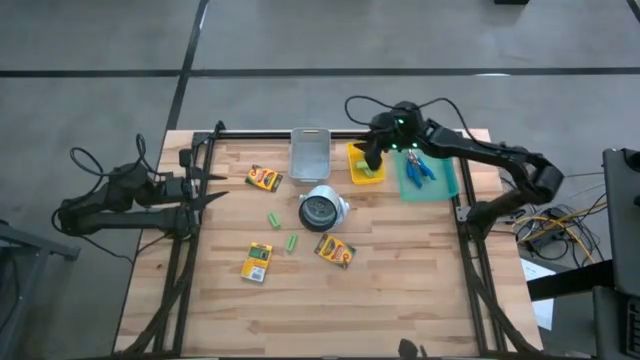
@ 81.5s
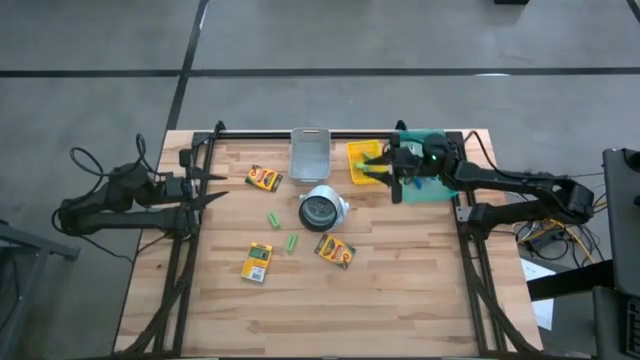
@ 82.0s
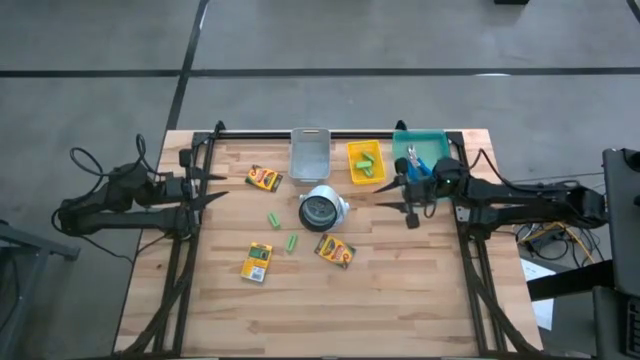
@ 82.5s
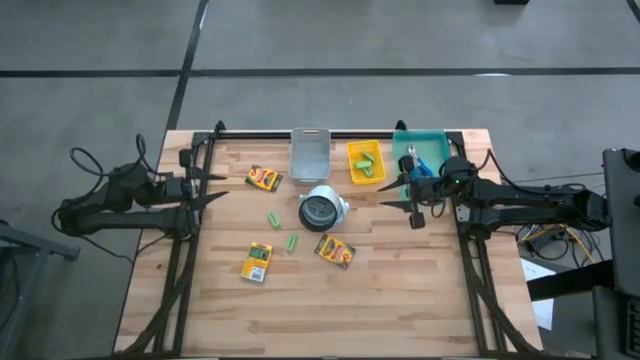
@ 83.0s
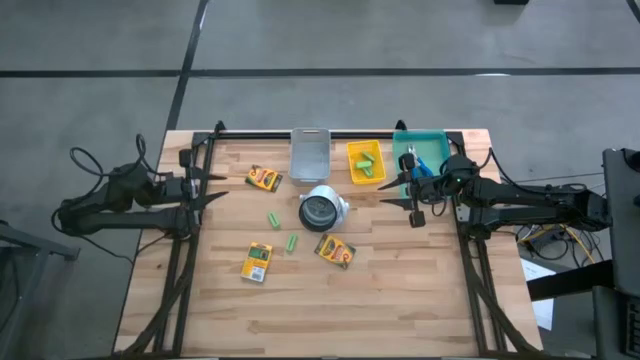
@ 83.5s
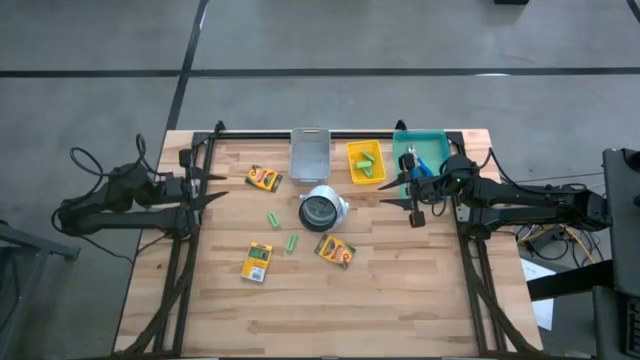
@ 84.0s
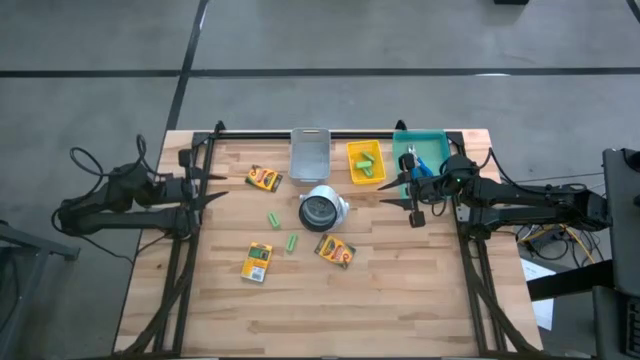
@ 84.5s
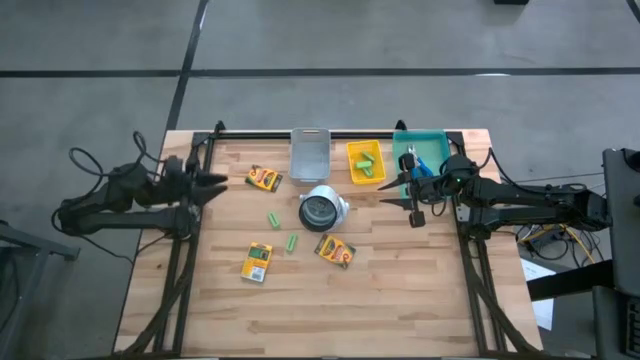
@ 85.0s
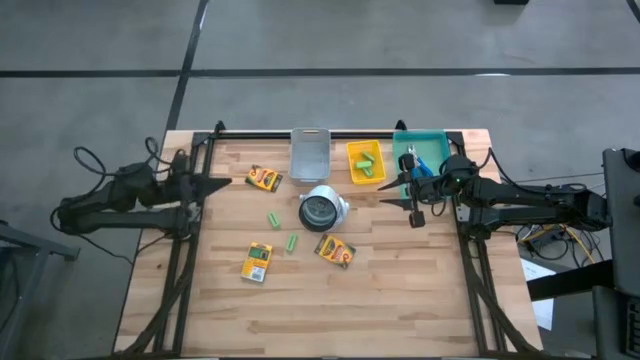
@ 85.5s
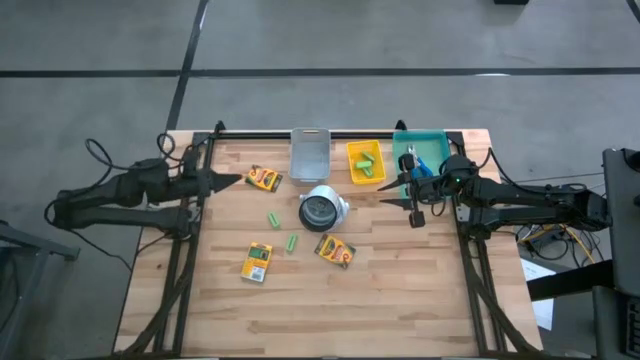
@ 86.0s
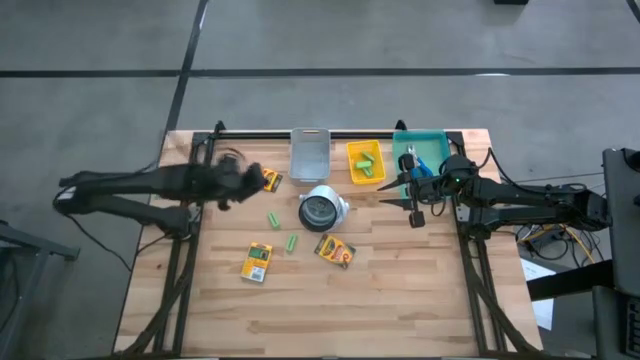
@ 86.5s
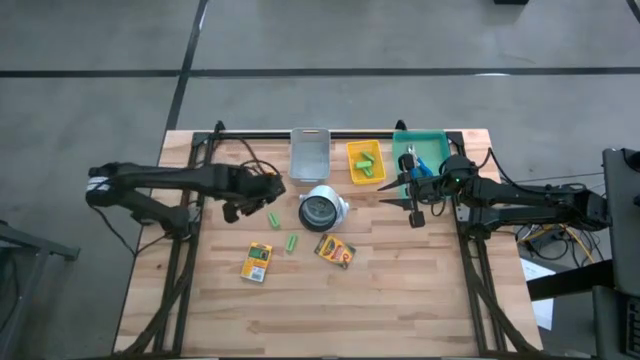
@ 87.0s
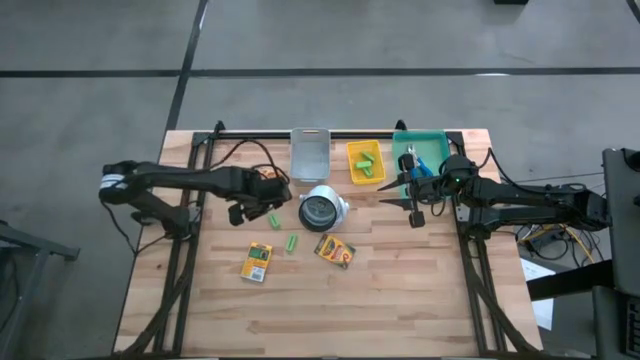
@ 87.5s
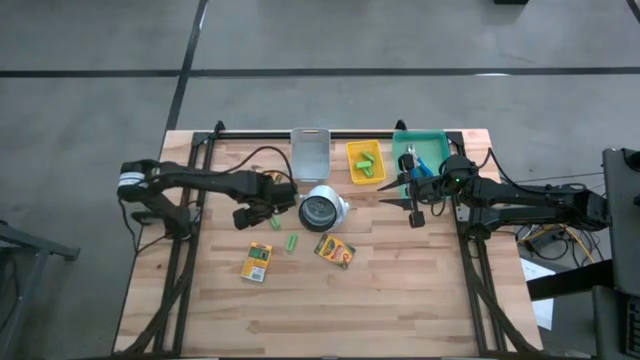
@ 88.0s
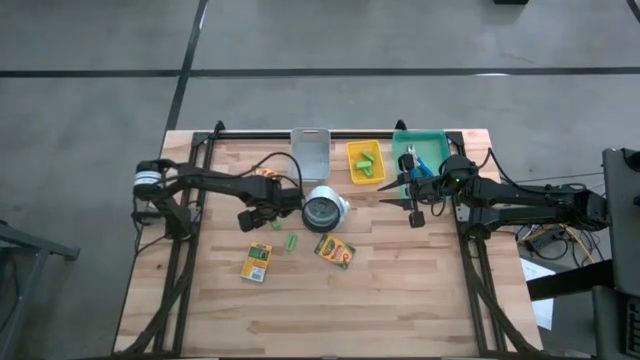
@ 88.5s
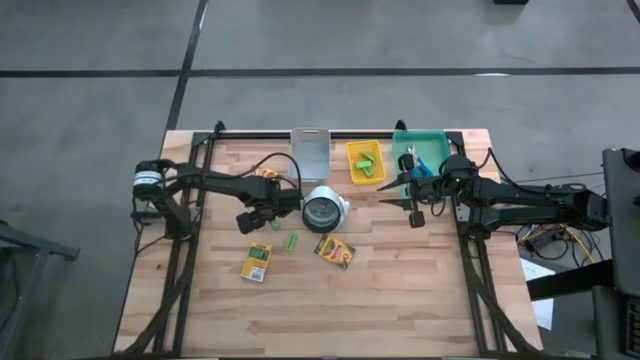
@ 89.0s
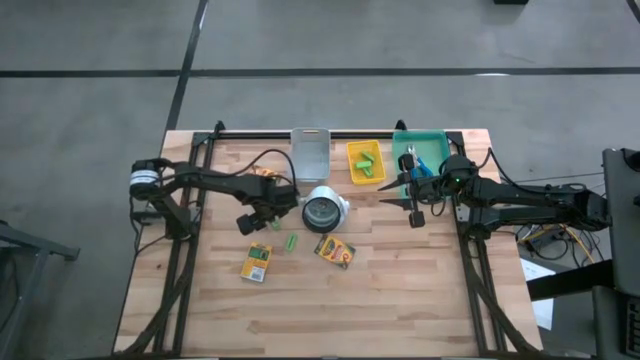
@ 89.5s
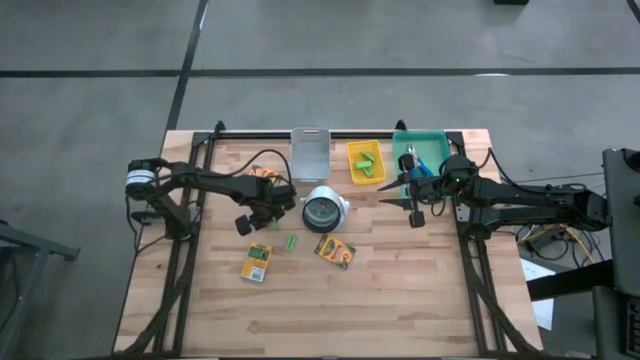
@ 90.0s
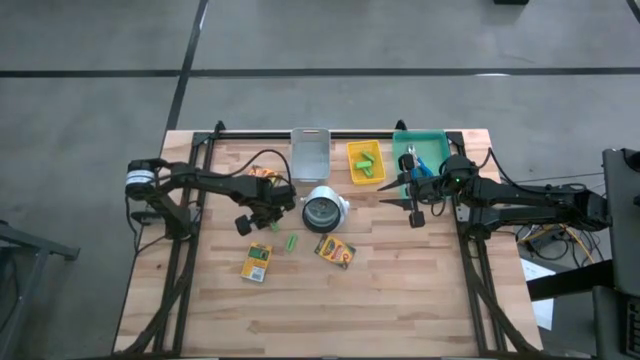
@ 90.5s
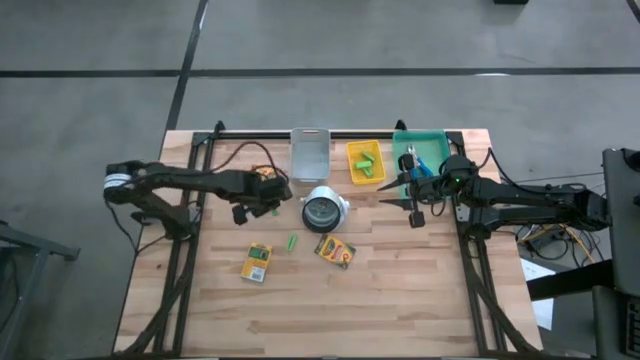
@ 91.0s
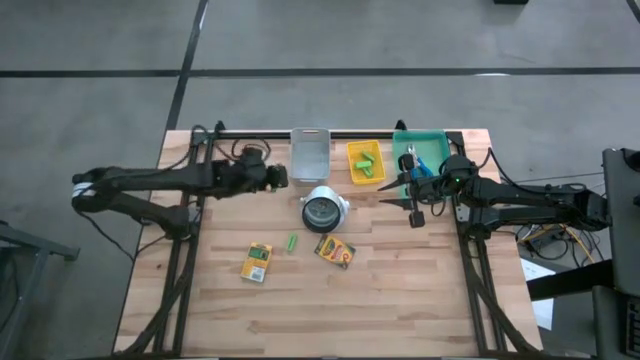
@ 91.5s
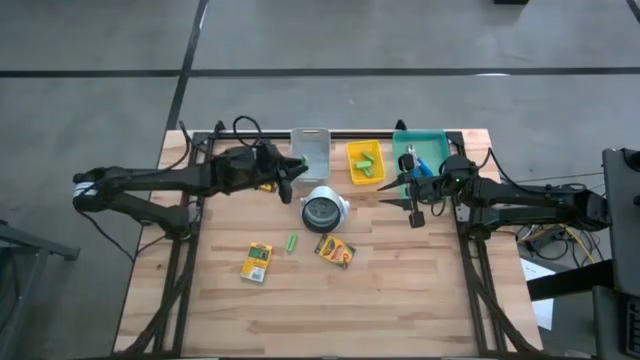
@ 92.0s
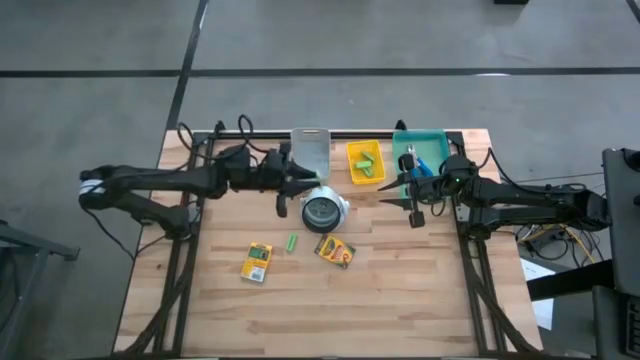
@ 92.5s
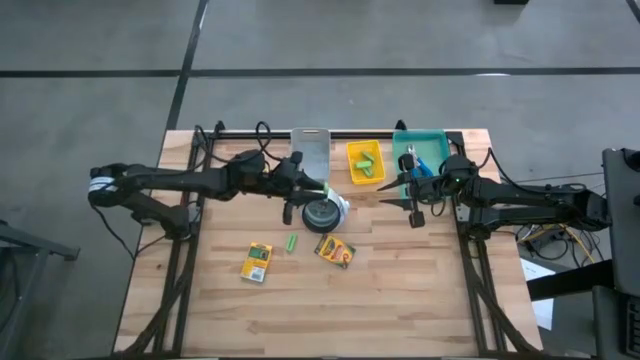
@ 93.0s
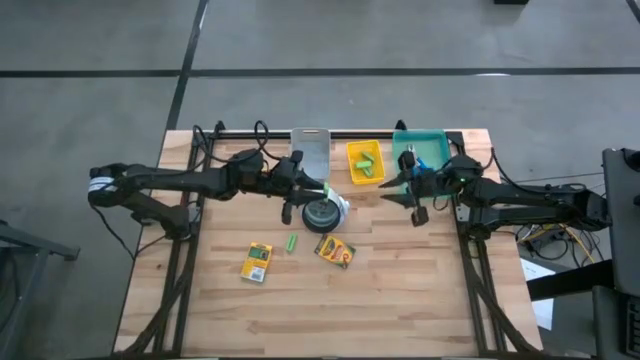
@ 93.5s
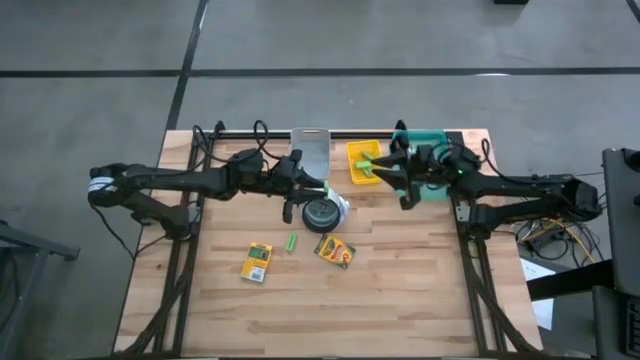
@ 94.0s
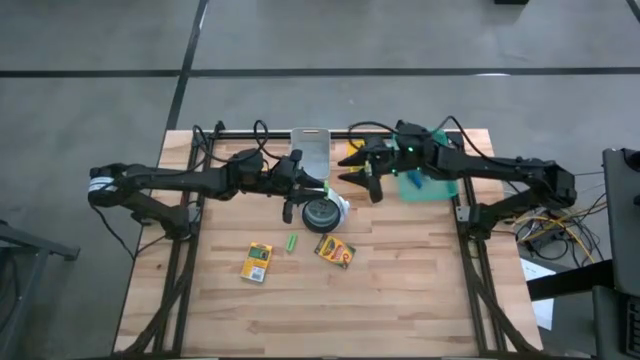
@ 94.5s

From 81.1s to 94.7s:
Task: Pick & Place School Supplies
Put the green eraser into the yellow bin

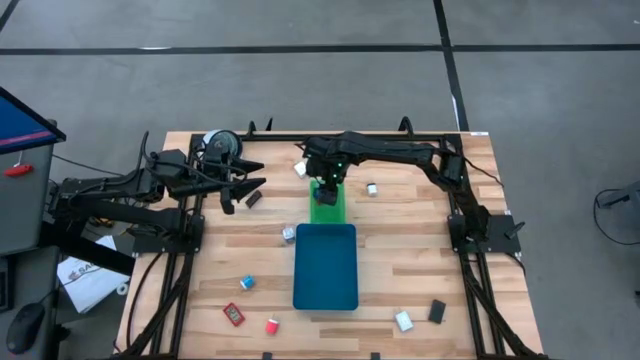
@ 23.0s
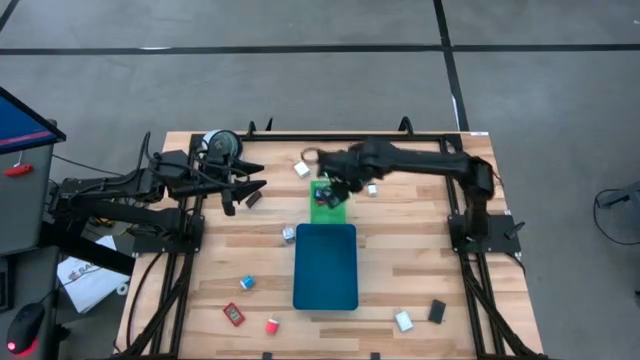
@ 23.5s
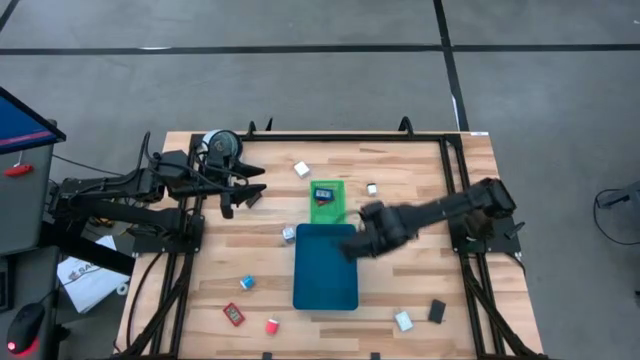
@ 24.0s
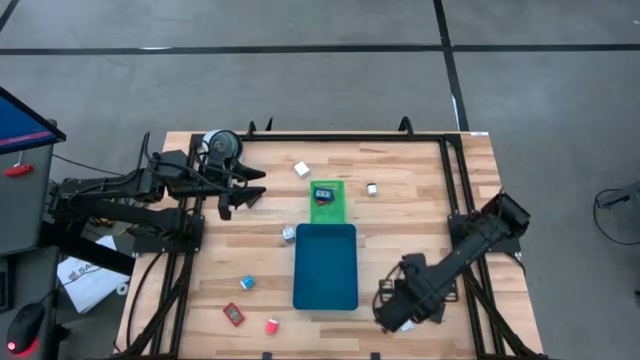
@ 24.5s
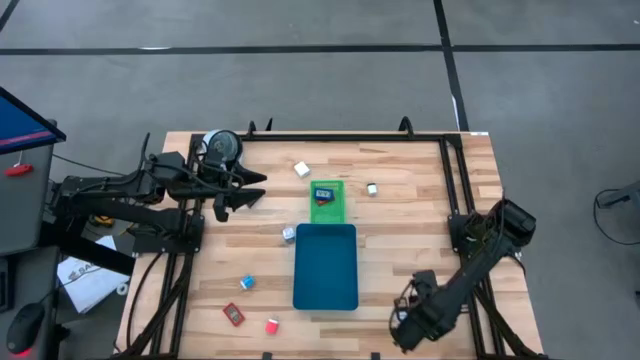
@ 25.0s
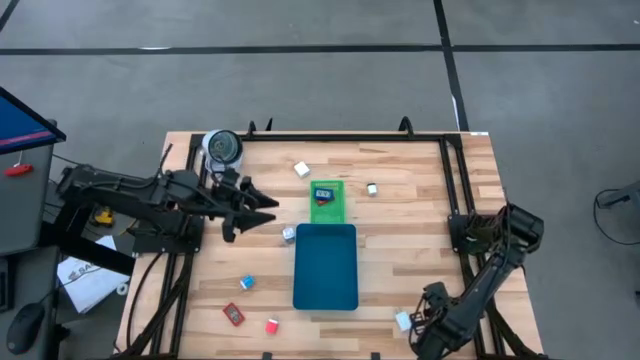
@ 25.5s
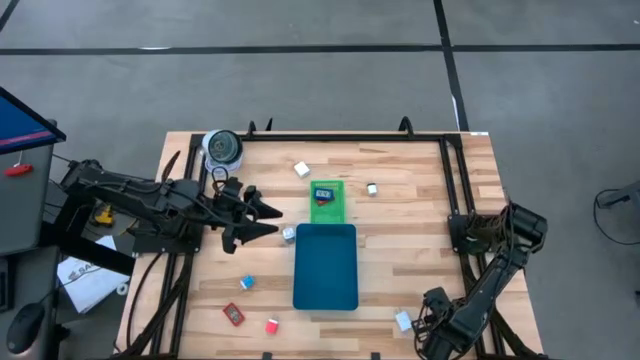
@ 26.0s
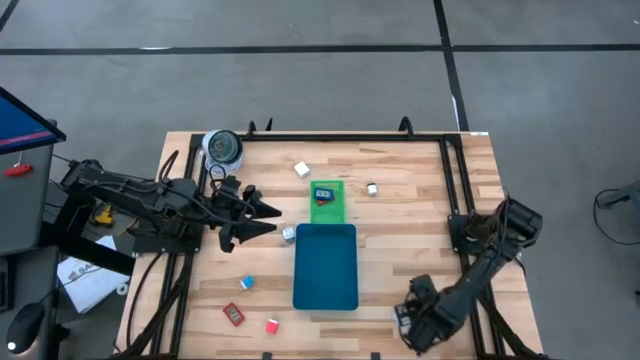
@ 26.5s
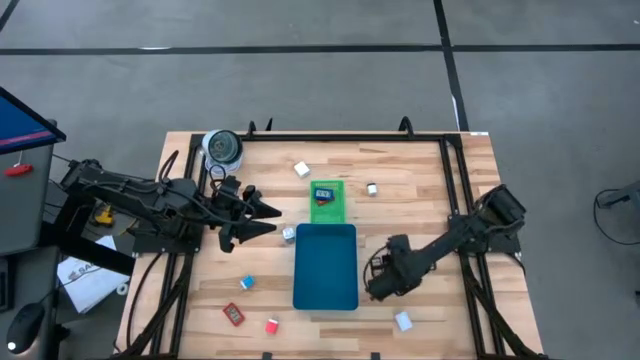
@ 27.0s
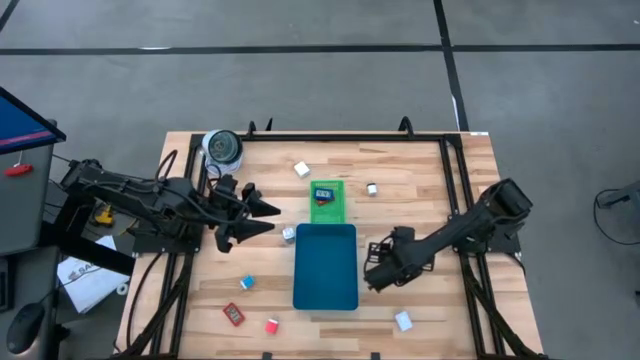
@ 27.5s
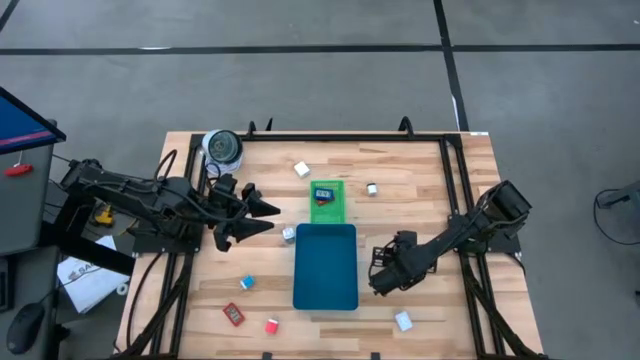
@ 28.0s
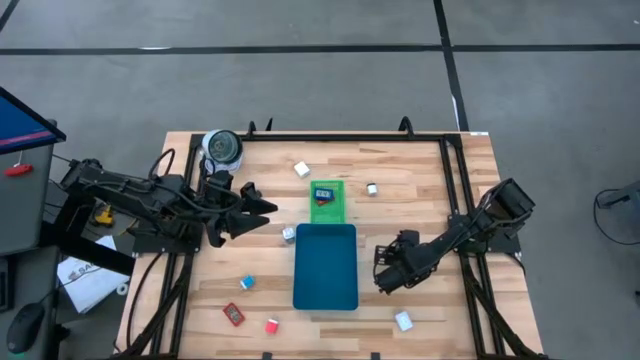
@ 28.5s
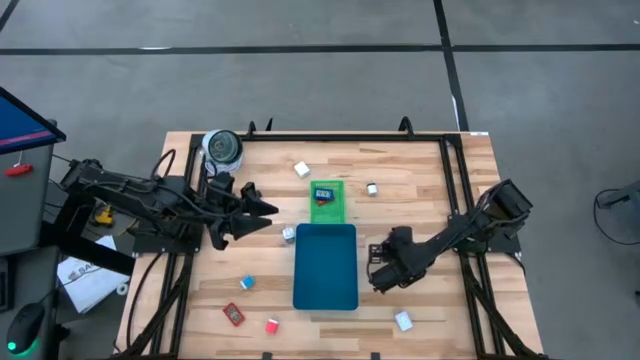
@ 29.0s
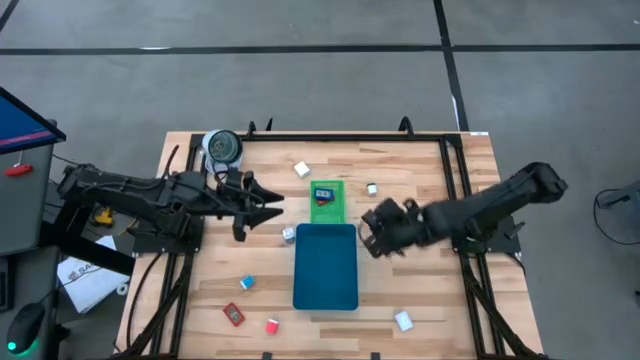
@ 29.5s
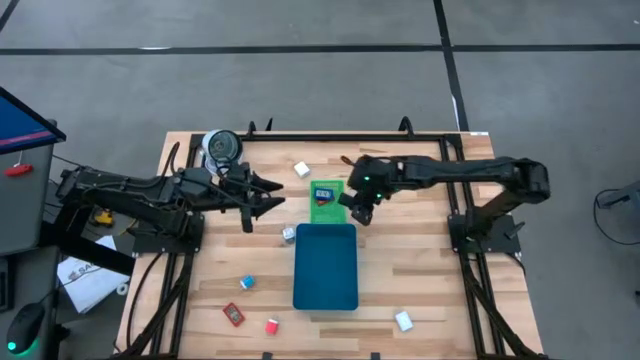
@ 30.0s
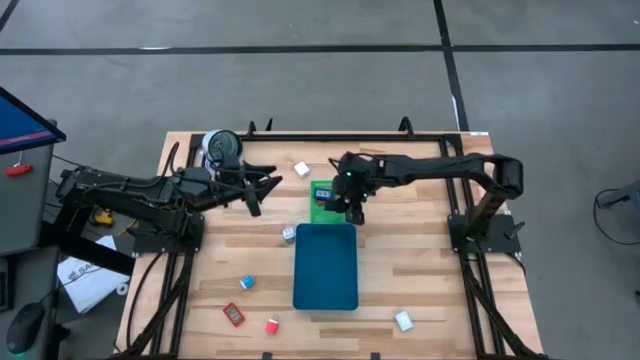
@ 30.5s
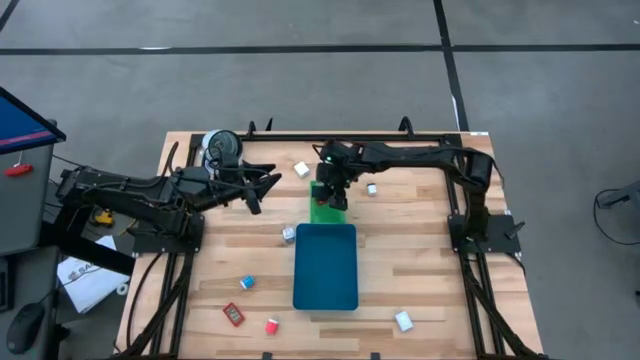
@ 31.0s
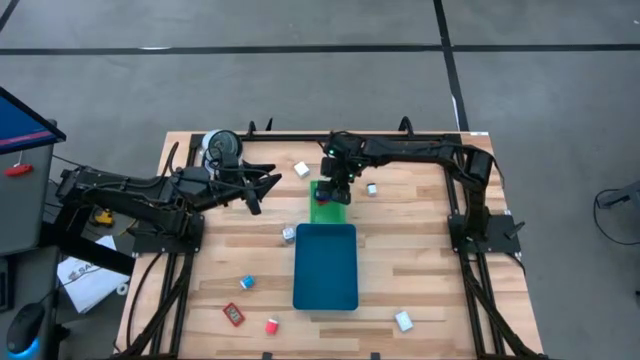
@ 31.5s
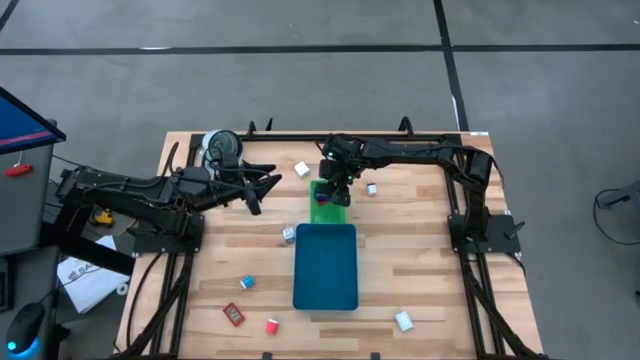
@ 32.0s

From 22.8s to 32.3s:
Task: Pick & Place Office items
Put the bottom black digital clock into the green bin
